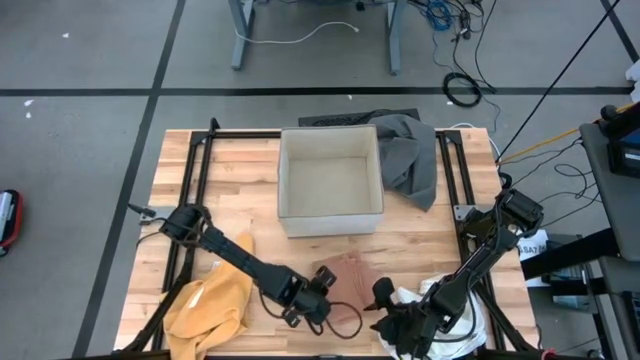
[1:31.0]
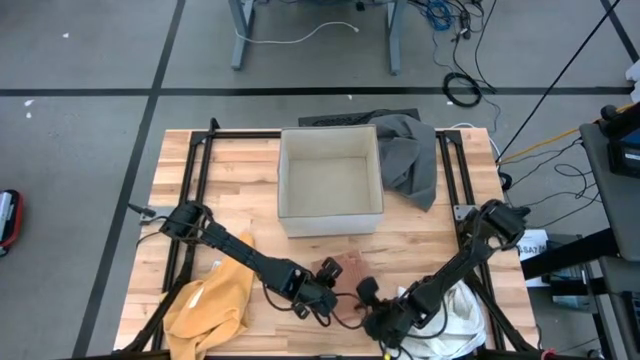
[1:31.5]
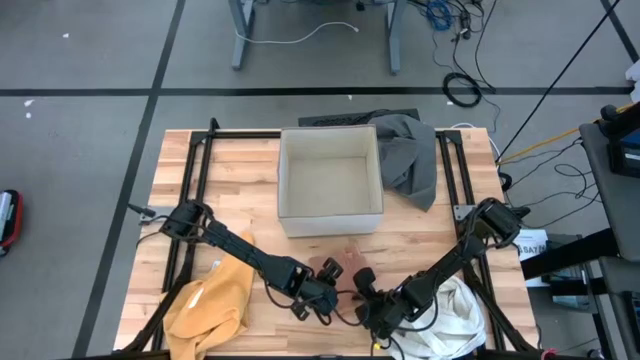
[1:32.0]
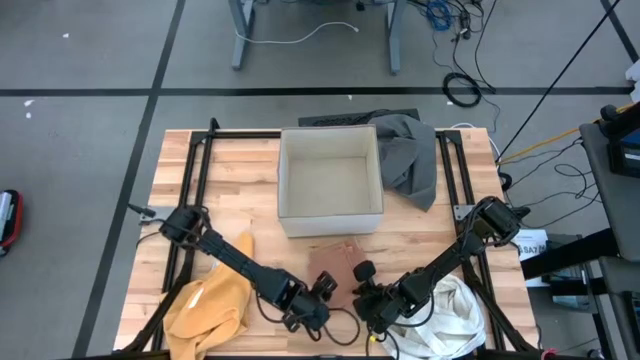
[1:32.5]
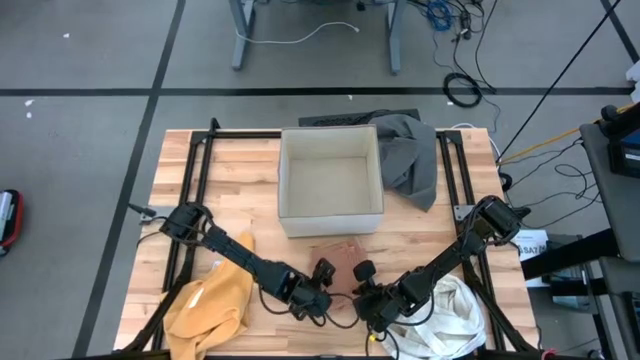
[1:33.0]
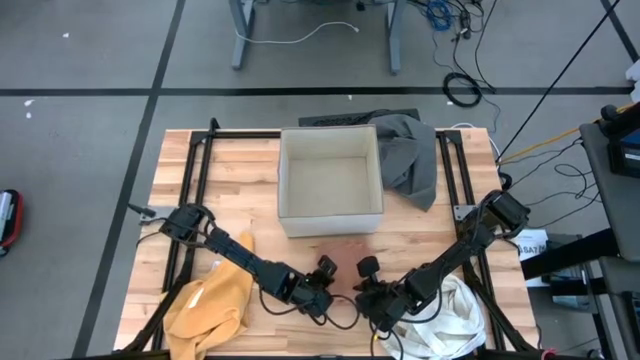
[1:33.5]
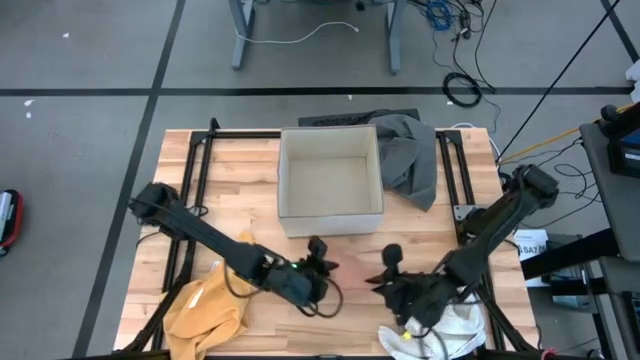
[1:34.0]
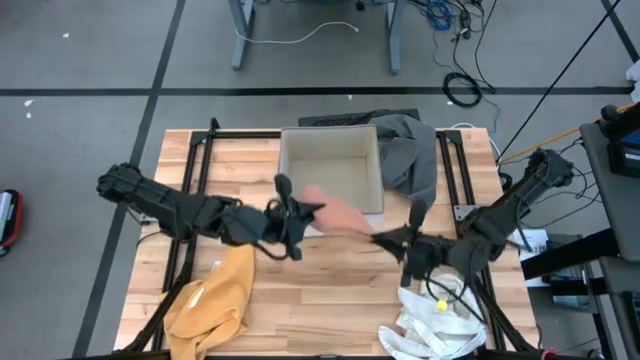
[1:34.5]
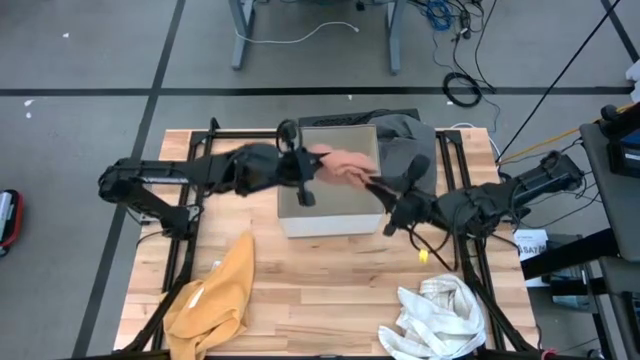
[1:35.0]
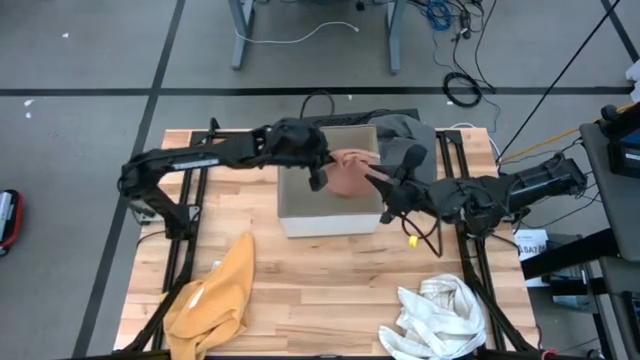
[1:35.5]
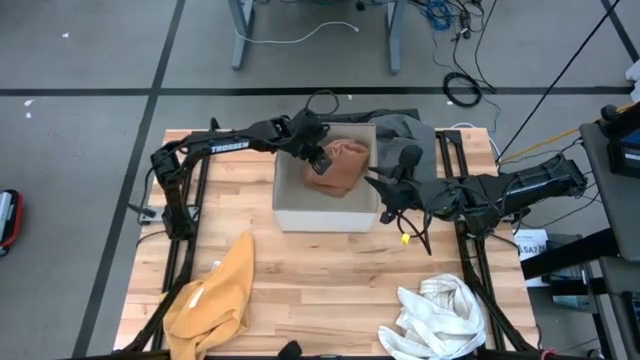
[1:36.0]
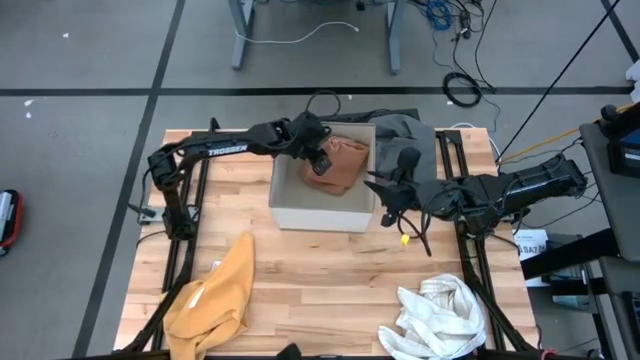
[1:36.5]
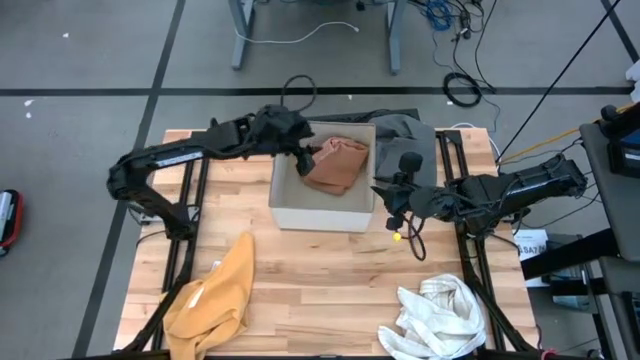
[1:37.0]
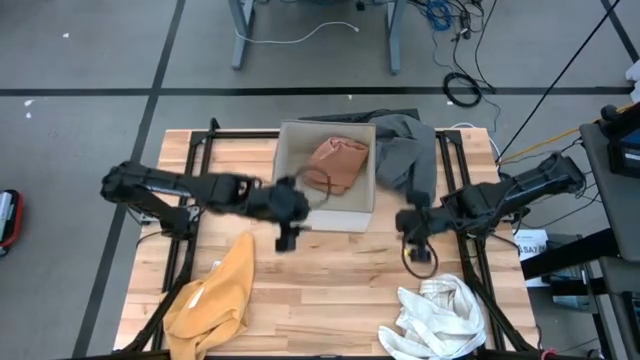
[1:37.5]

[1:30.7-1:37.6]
Task: Fold towel
Put the folded brown towel into the laundry bin
